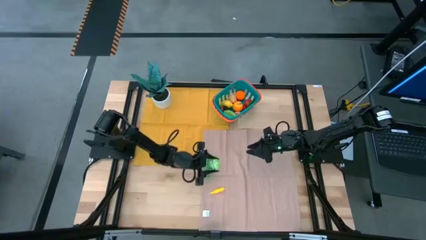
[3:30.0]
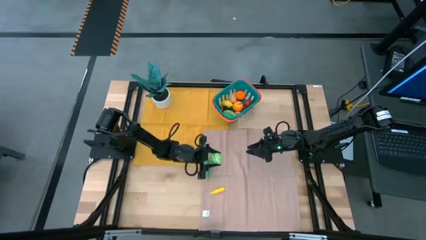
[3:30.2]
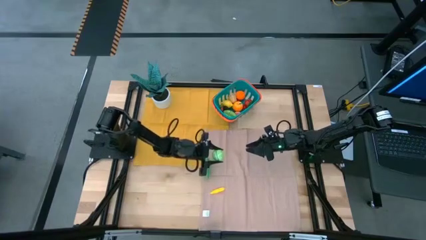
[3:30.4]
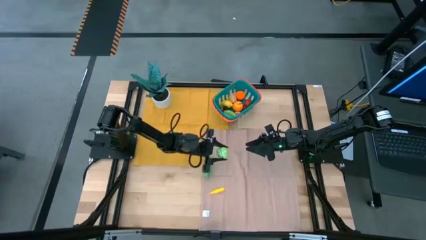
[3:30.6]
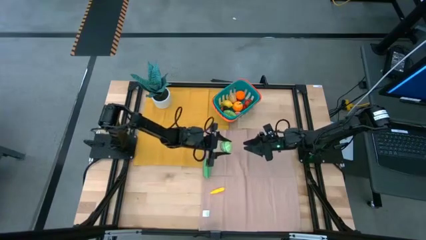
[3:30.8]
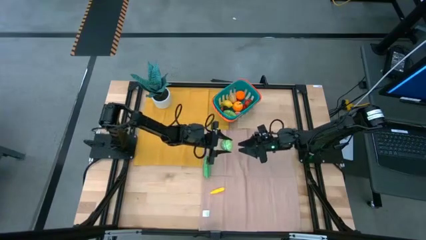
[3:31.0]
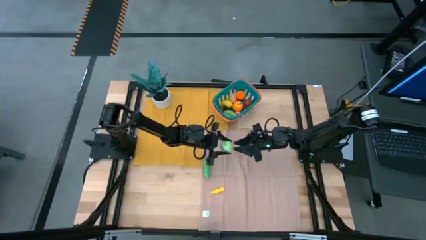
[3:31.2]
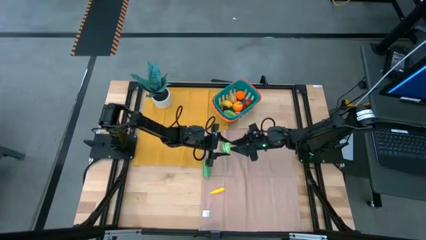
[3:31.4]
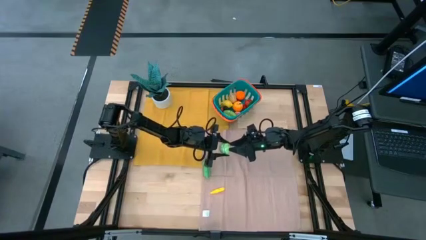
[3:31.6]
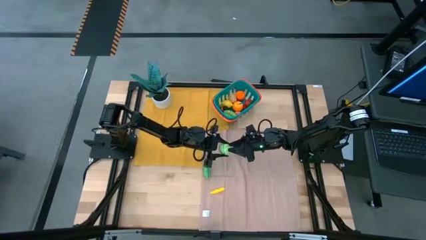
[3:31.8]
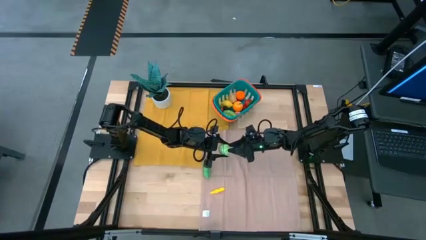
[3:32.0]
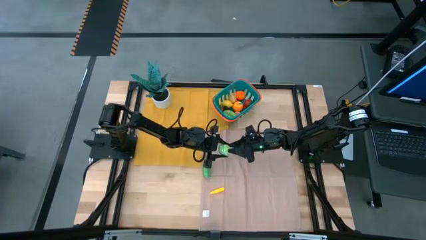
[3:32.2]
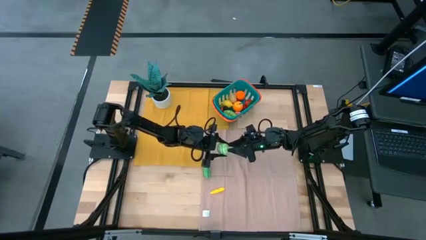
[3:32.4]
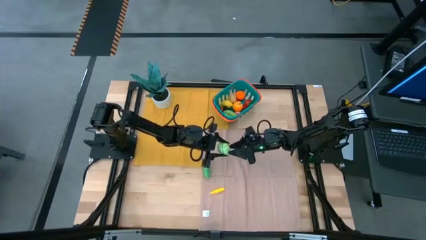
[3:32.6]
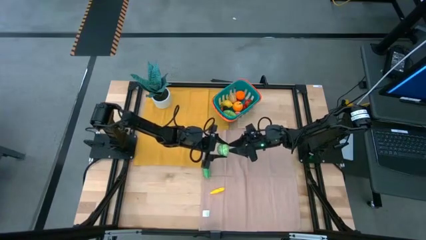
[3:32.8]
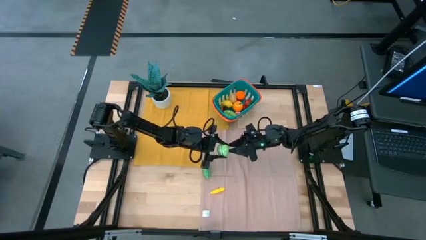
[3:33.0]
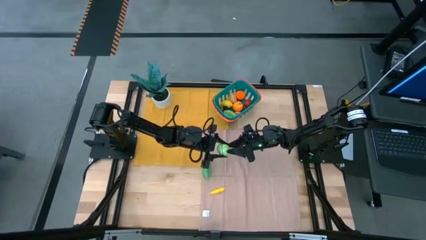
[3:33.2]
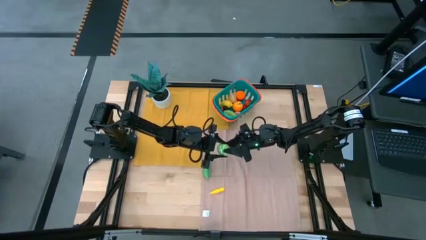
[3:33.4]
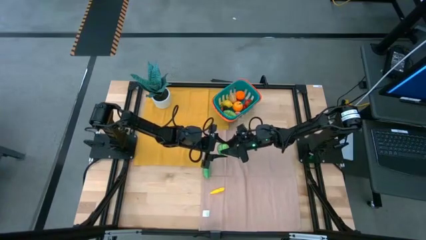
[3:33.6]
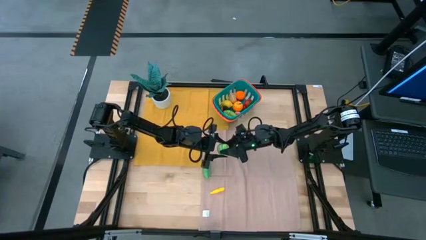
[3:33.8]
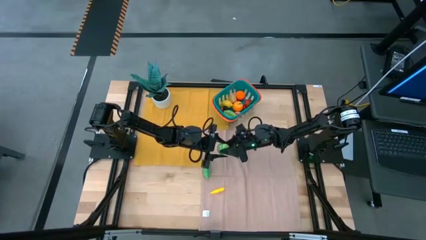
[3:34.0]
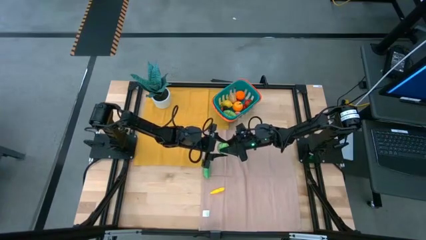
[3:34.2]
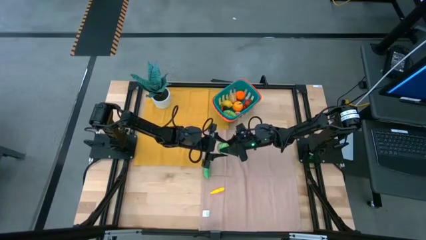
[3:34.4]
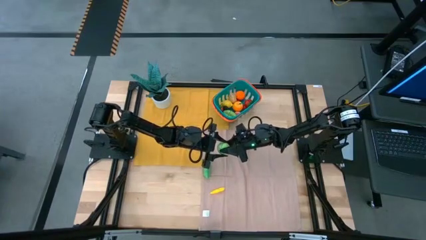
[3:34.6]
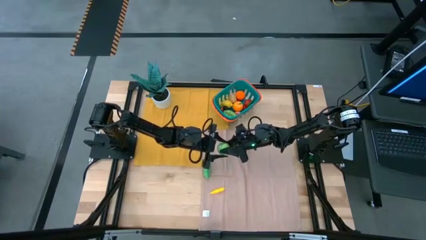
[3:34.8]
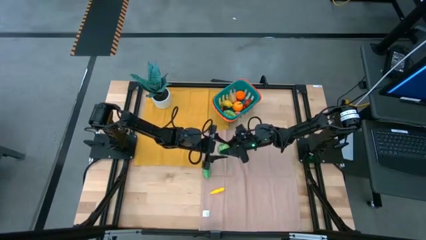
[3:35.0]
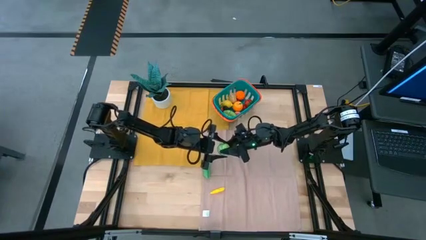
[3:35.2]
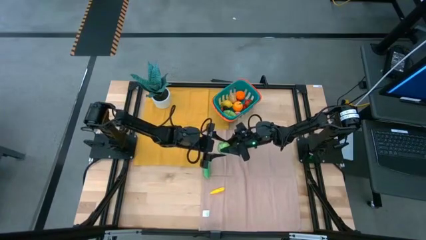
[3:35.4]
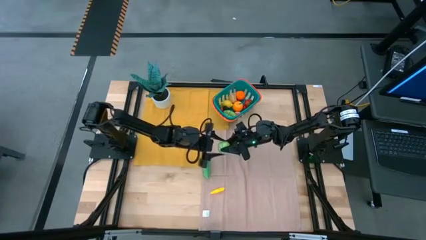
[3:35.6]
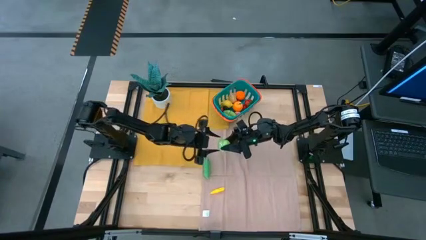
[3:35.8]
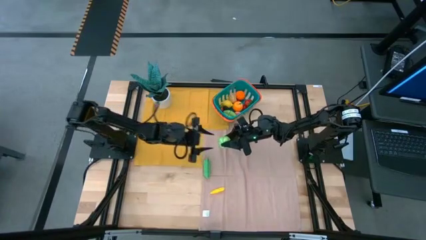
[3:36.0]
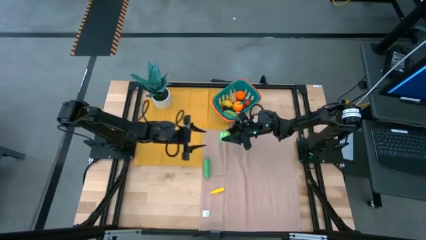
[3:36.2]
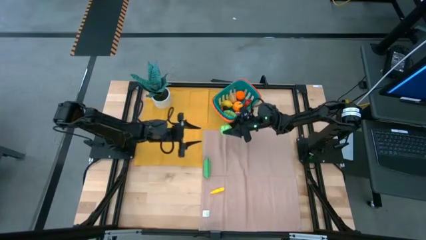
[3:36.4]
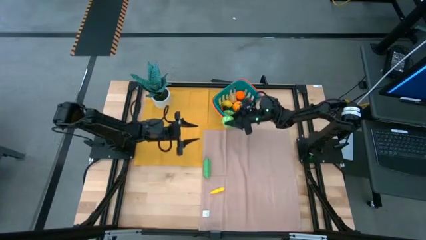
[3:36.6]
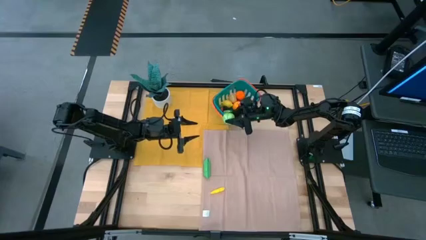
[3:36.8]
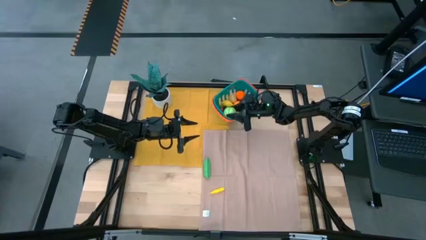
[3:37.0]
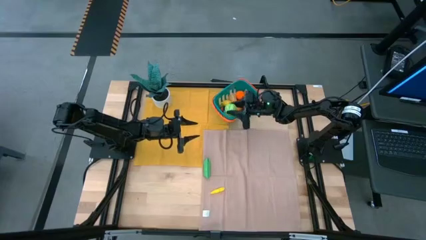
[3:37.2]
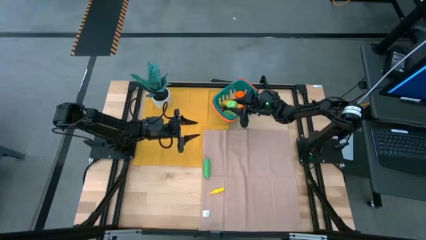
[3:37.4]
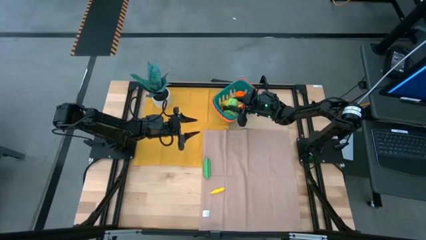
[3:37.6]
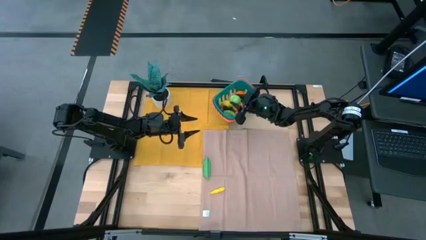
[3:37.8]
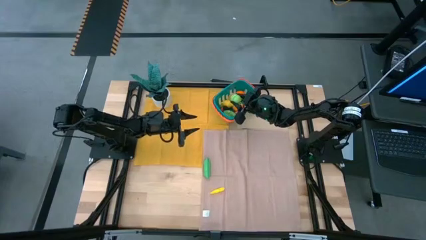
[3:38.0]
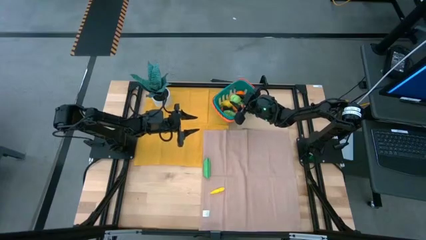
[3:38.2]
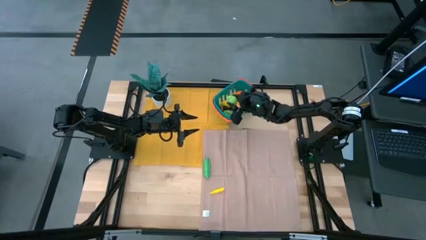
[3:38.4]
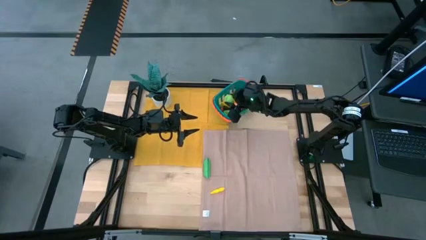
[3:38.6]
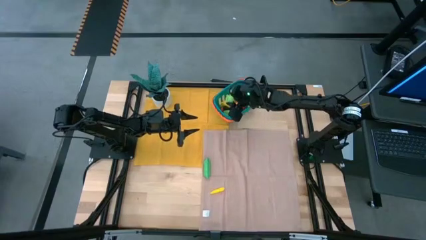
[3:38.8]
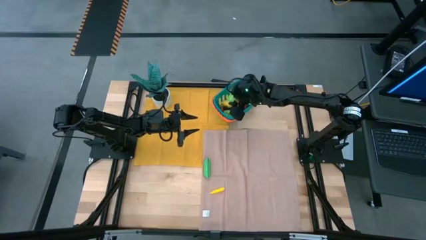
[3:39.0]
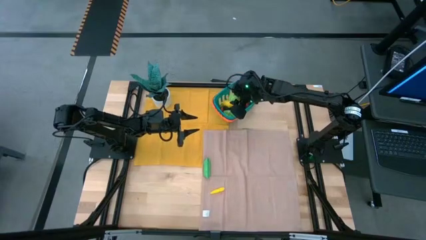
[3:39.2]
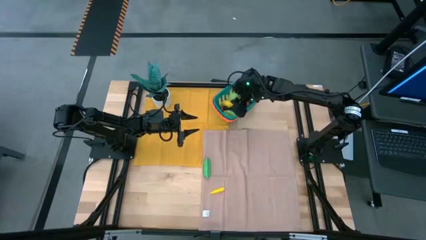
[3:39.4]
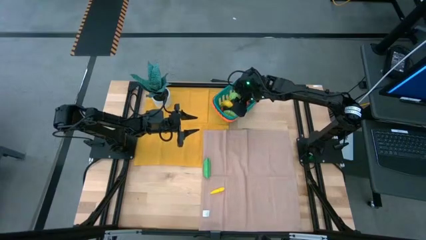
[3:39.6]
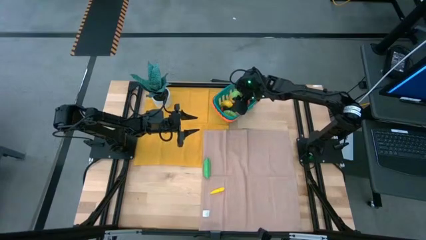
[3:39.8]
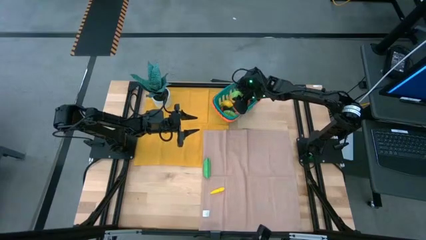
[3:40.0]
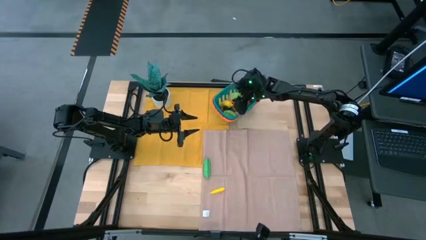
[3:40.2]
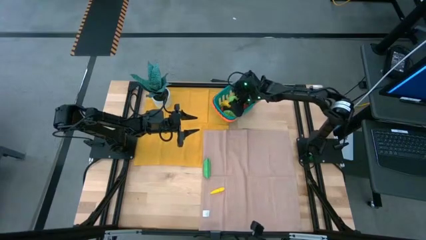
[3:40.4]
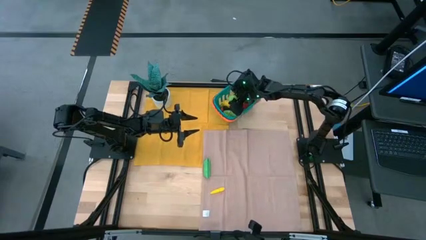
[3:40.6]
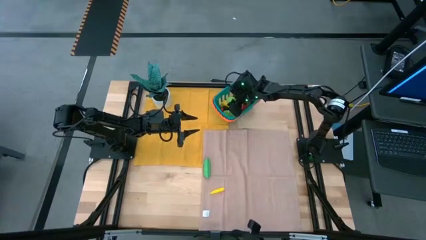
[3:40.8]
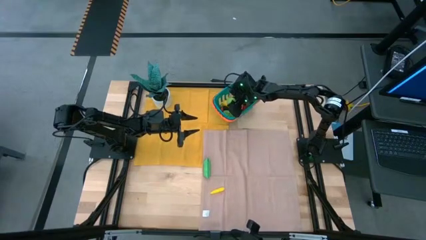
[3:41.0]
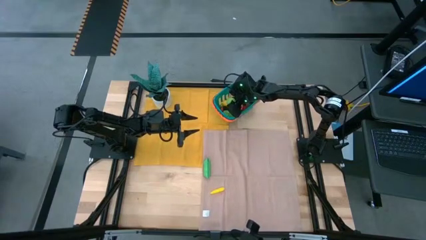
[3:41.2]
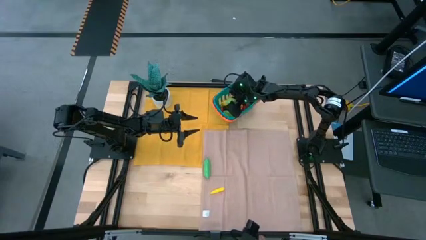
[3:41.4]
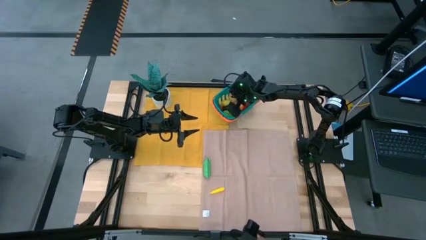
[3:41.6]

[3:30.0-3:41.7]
Task: Pick and placing Produce into tupperware
Put the cabbage into the basket

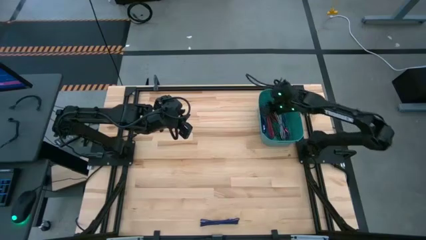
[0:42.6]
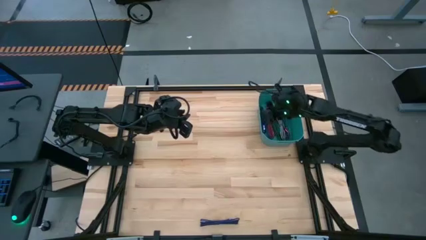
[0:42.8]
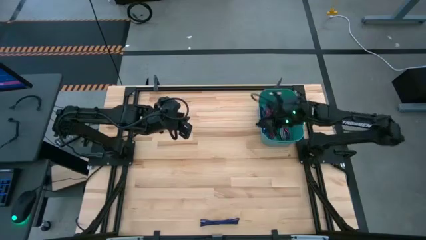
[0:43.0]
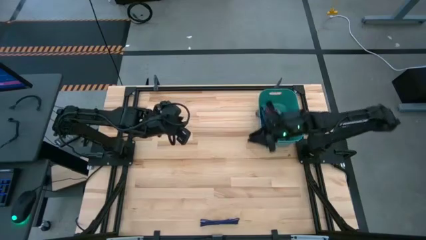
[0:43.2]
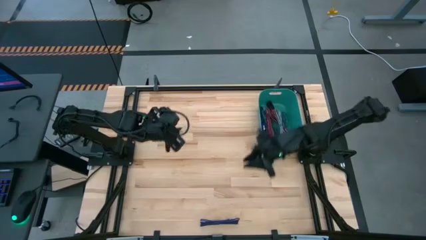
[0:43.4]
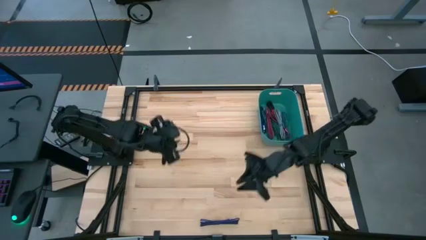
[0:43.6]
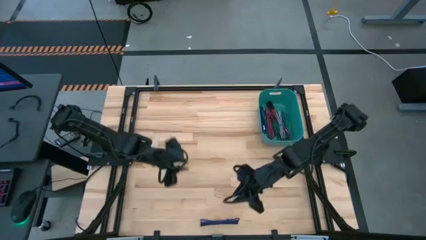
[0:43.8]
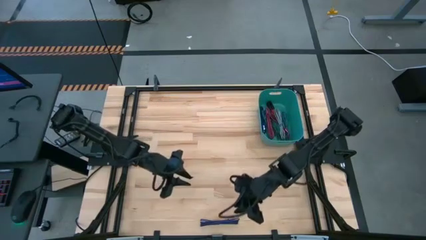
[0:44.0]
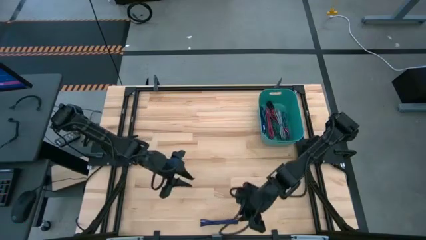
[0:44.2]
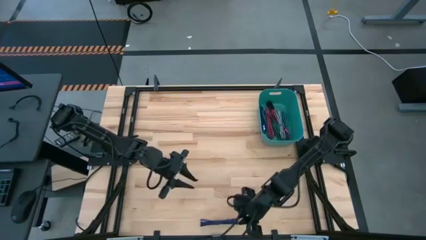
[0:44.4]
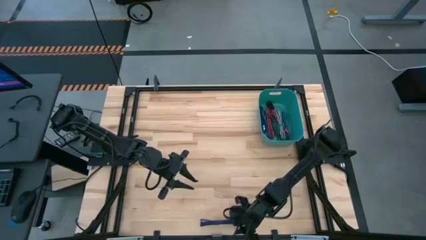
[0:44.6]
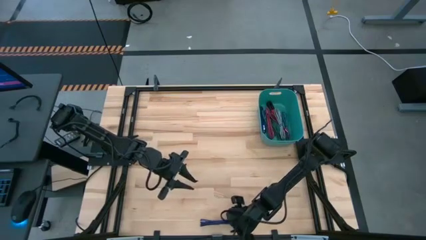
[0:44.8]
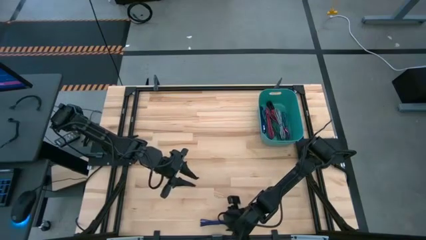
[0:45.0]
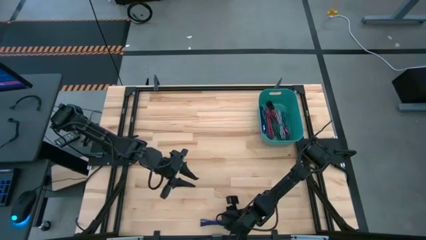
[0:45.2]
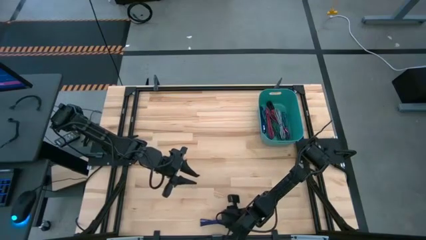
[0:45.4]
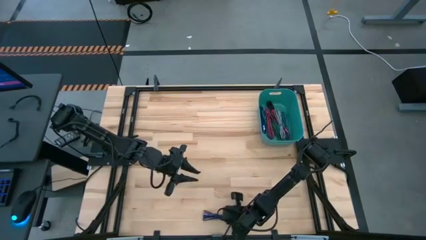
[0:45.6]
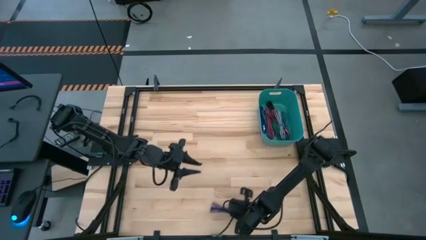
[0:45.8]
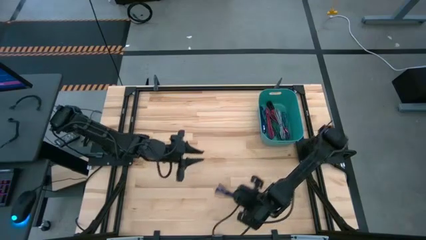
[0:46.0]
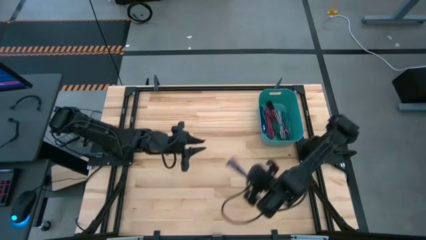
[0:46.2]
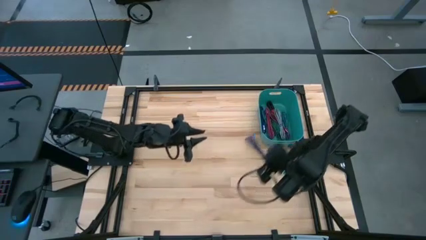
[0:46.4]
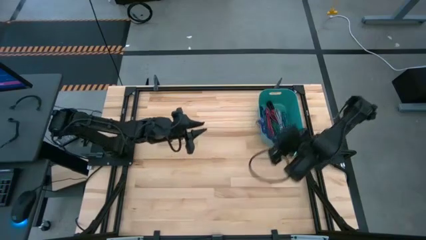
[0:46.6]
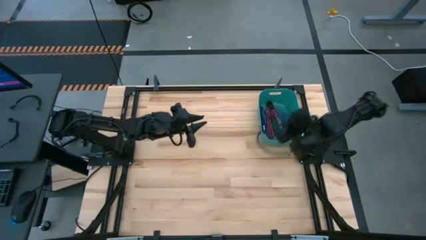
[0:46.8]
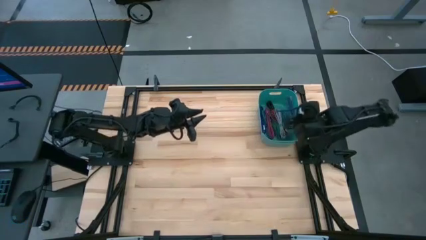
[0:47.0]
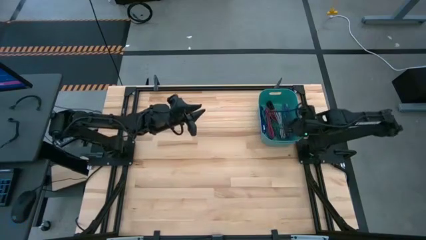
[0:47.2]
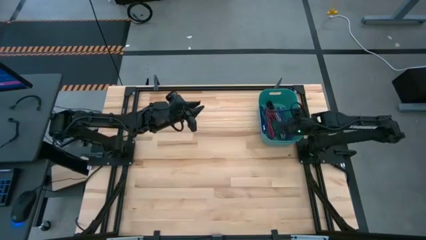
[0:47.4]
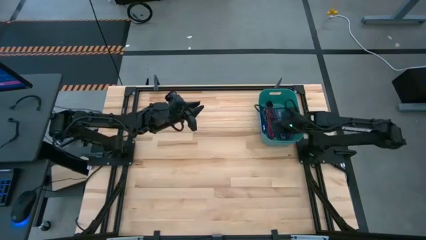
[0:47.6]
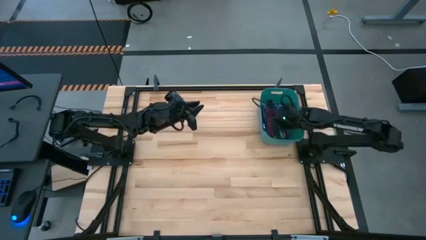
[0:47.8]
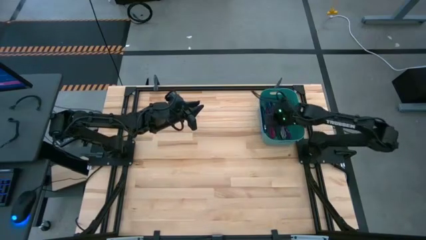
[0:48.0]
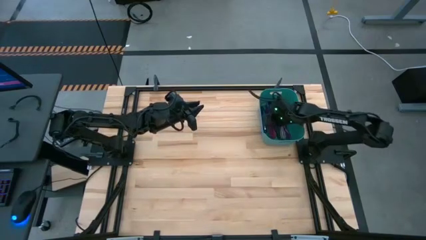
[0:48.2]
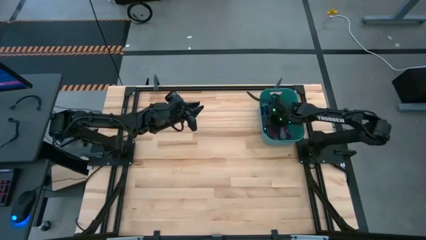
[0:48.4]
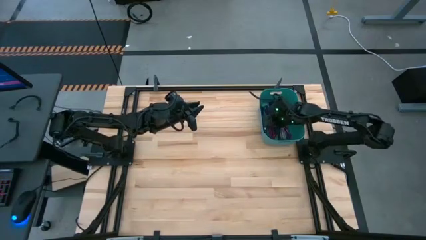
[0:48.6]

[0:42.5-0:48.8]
Task: Pick and place USB-C Cables
Put the blue charger cable into the green bin
